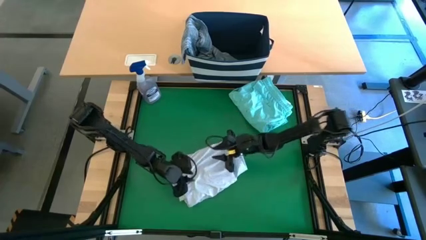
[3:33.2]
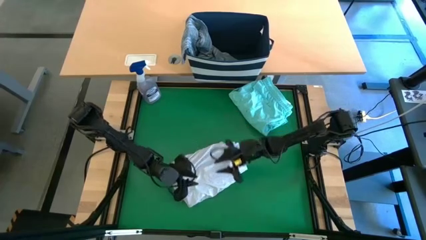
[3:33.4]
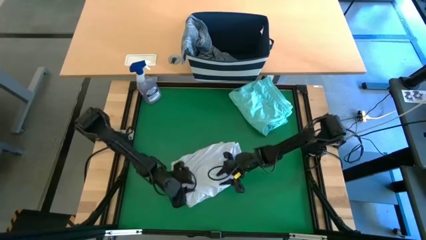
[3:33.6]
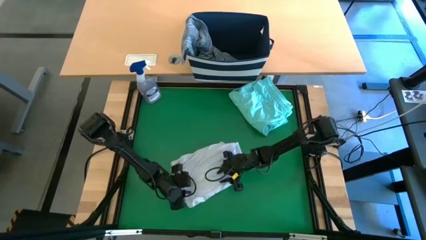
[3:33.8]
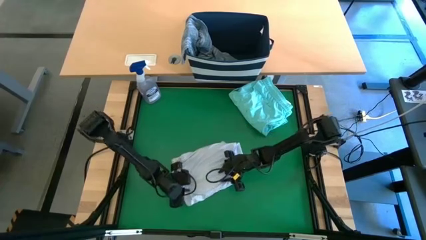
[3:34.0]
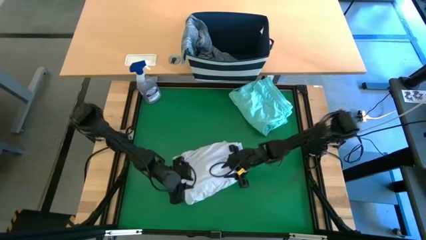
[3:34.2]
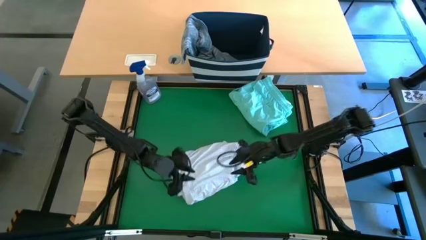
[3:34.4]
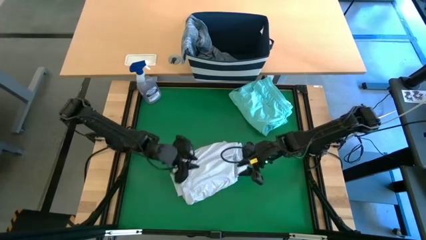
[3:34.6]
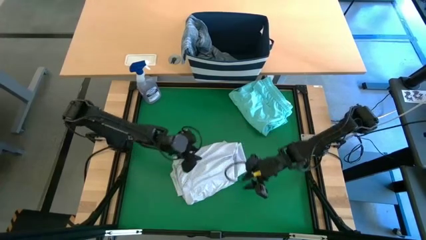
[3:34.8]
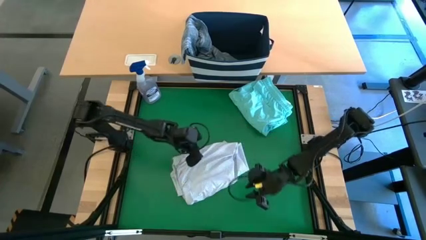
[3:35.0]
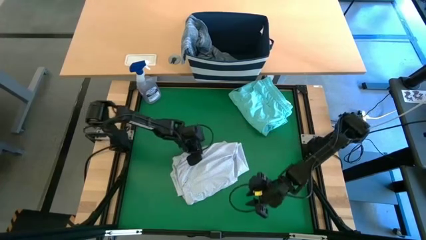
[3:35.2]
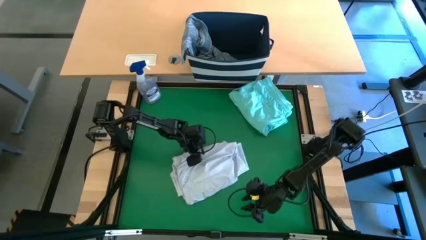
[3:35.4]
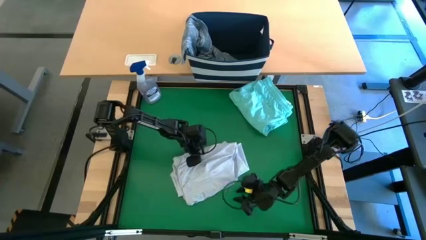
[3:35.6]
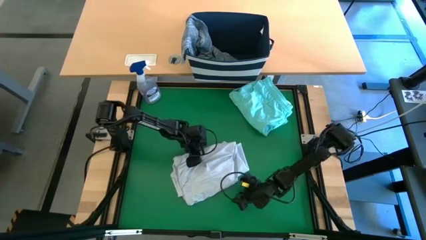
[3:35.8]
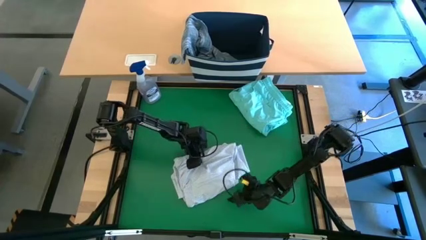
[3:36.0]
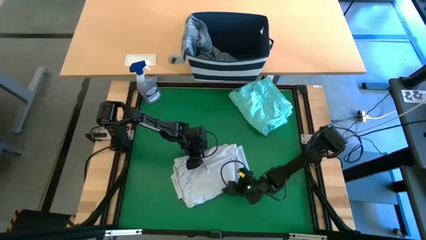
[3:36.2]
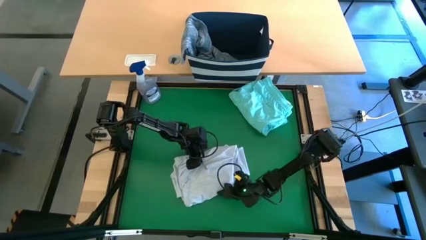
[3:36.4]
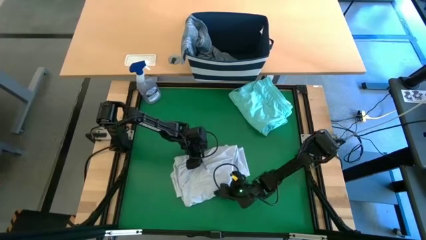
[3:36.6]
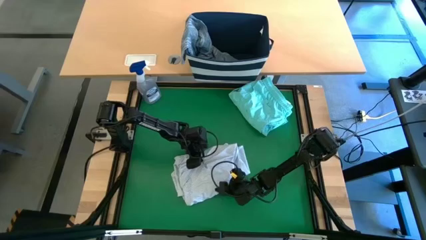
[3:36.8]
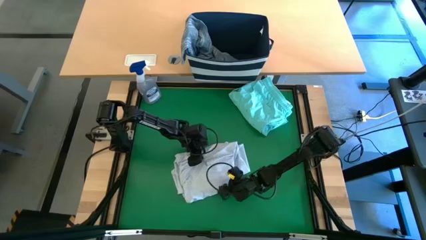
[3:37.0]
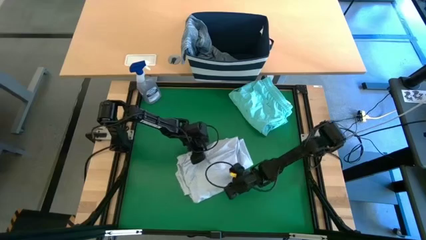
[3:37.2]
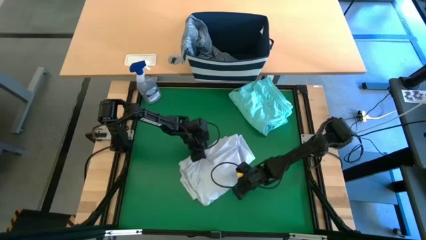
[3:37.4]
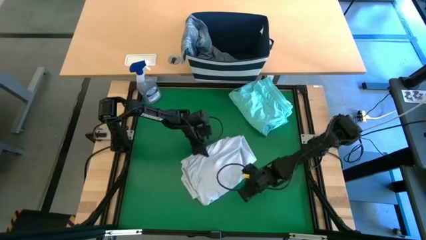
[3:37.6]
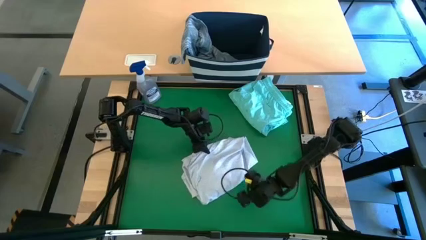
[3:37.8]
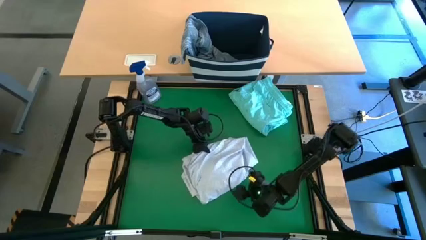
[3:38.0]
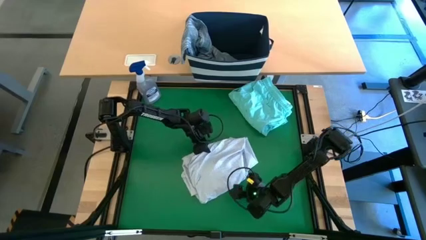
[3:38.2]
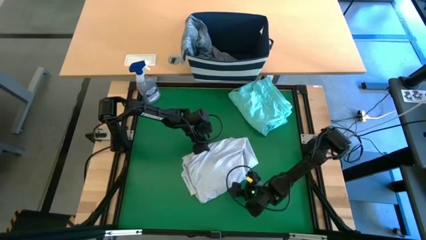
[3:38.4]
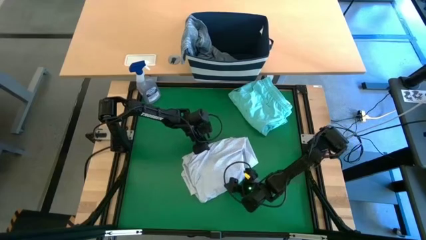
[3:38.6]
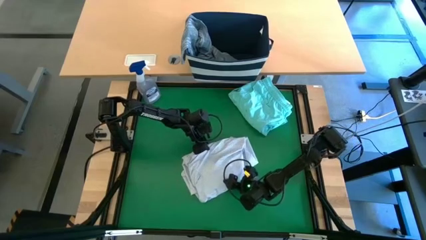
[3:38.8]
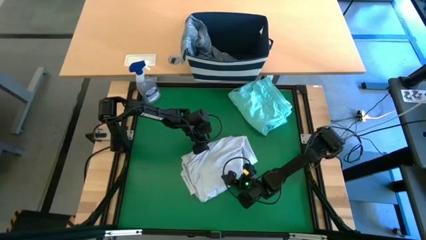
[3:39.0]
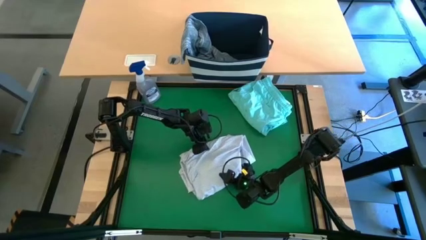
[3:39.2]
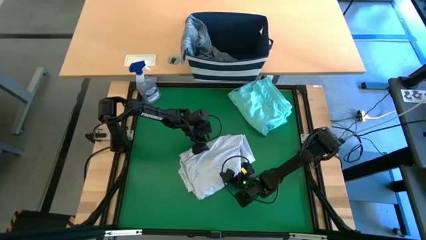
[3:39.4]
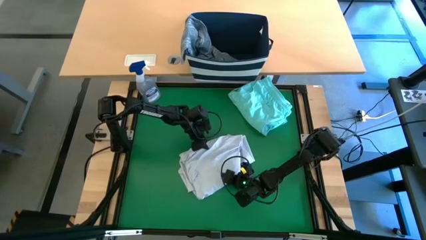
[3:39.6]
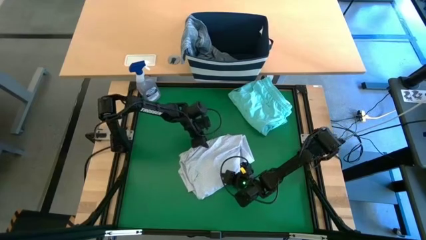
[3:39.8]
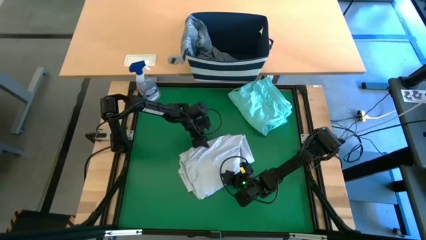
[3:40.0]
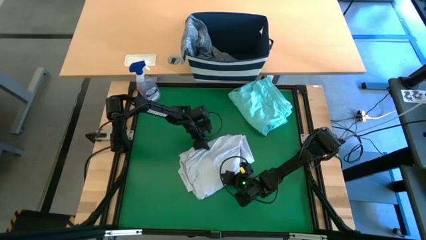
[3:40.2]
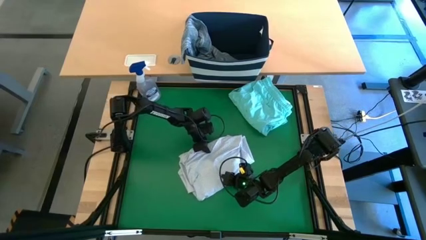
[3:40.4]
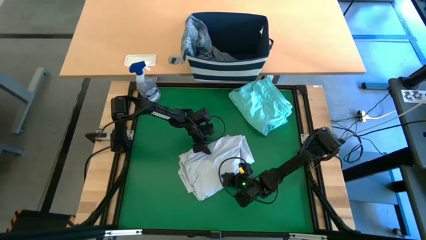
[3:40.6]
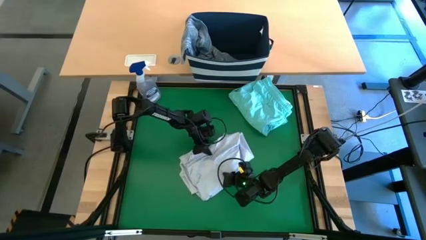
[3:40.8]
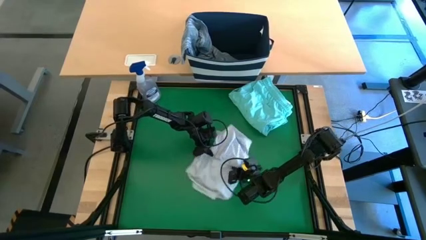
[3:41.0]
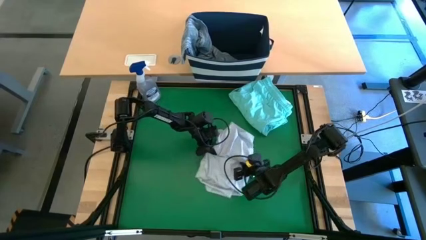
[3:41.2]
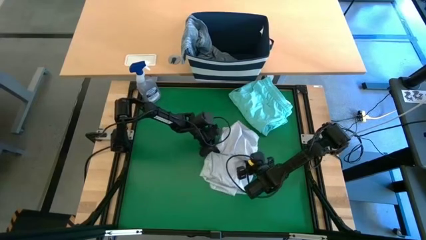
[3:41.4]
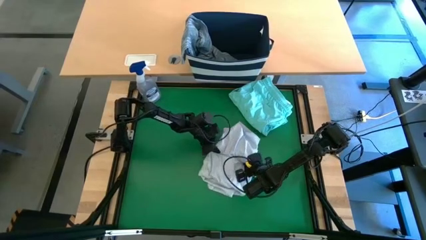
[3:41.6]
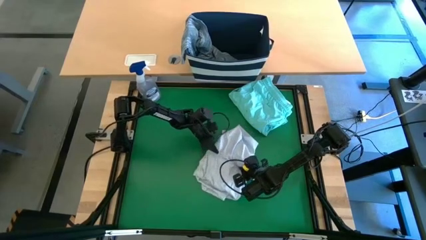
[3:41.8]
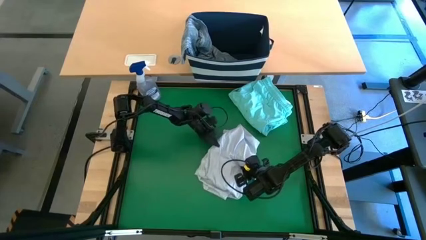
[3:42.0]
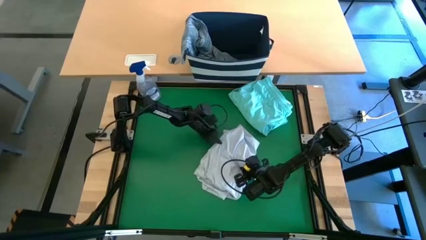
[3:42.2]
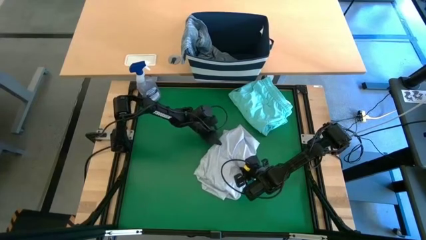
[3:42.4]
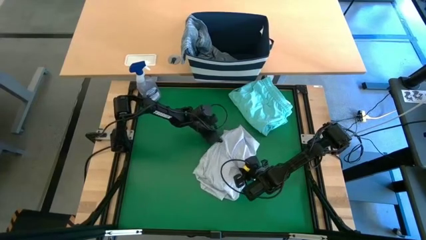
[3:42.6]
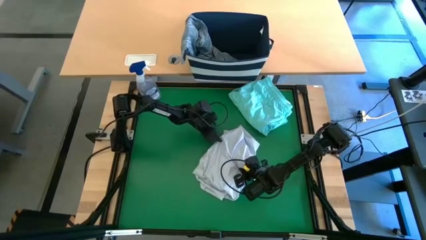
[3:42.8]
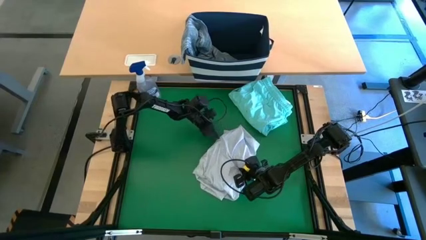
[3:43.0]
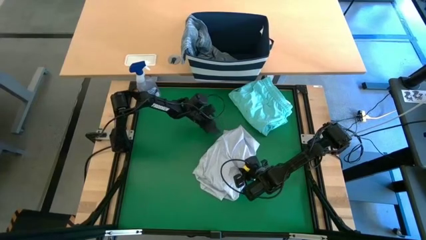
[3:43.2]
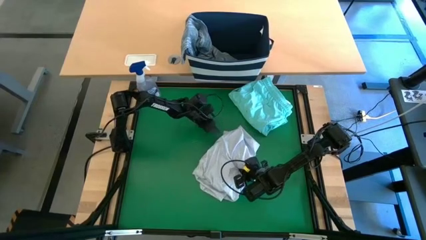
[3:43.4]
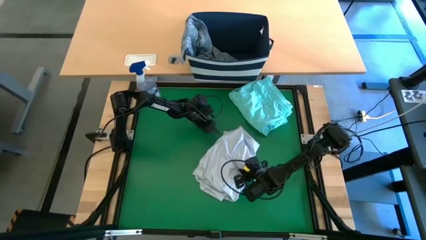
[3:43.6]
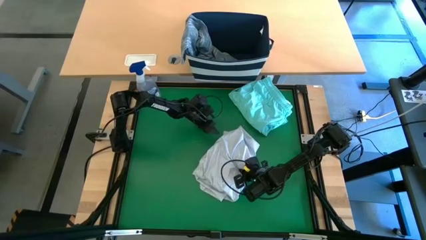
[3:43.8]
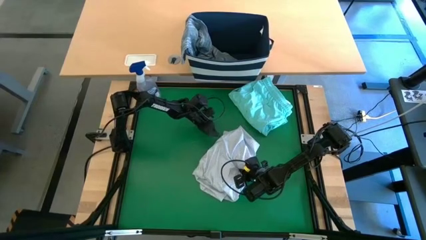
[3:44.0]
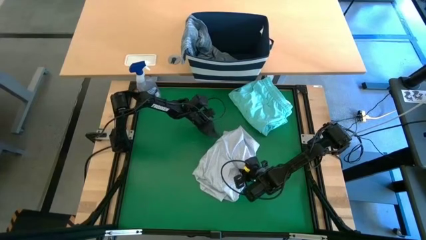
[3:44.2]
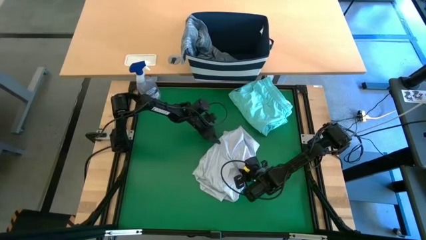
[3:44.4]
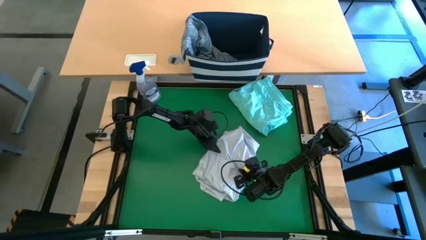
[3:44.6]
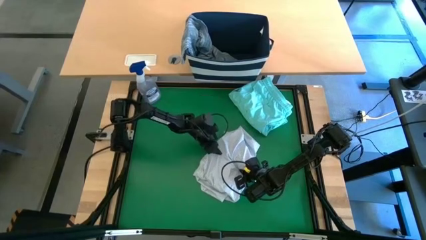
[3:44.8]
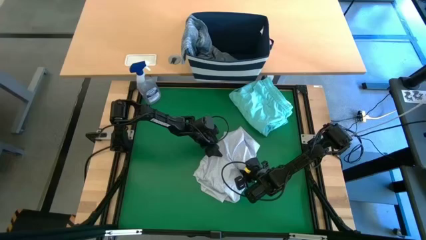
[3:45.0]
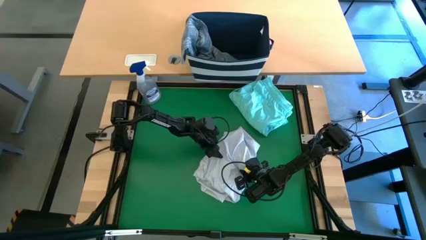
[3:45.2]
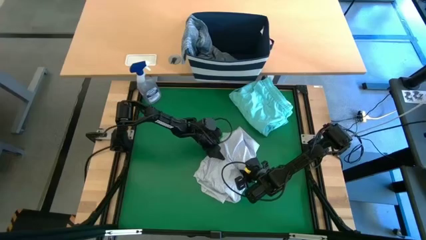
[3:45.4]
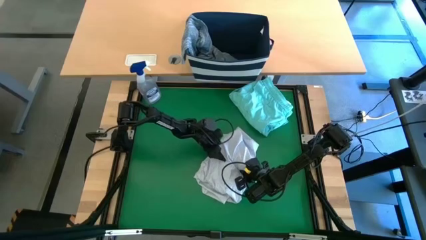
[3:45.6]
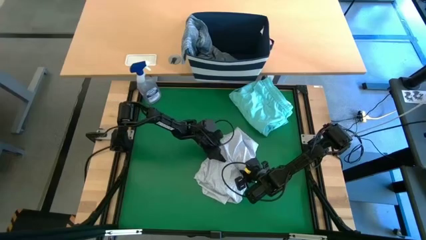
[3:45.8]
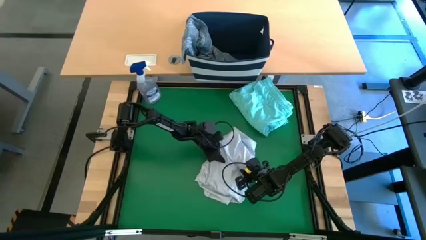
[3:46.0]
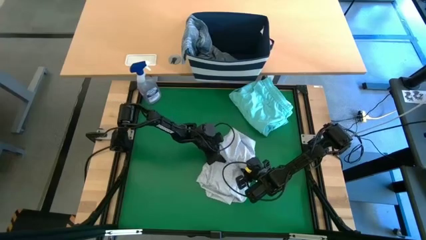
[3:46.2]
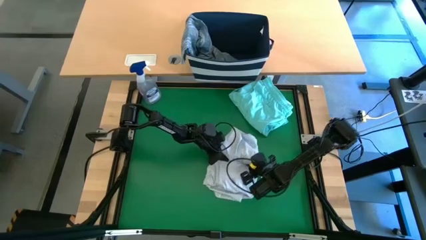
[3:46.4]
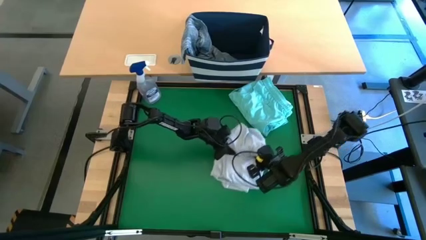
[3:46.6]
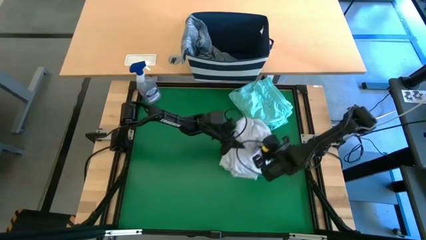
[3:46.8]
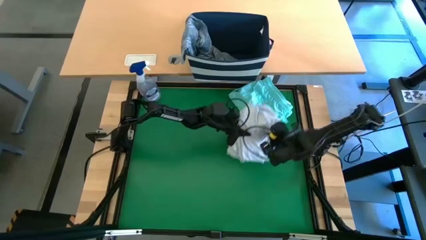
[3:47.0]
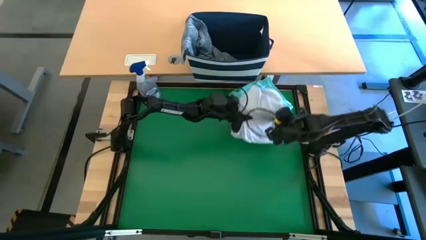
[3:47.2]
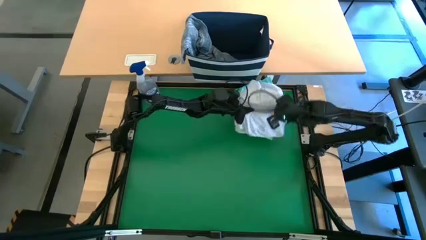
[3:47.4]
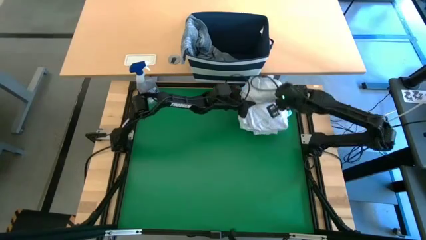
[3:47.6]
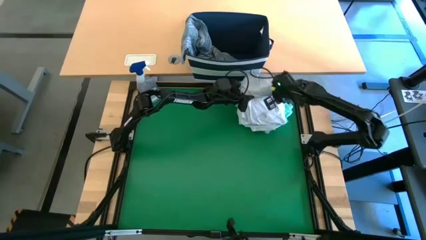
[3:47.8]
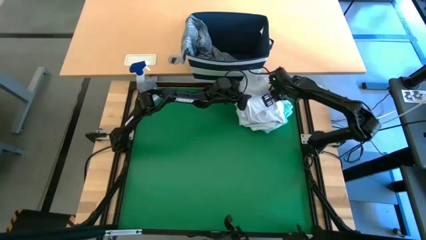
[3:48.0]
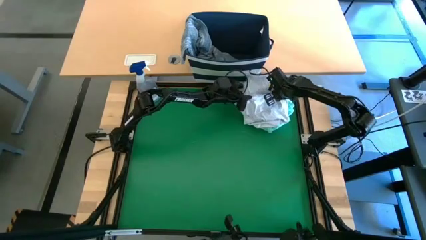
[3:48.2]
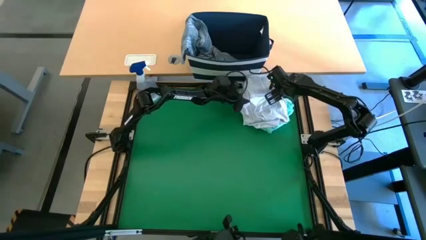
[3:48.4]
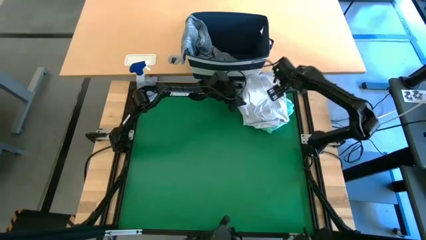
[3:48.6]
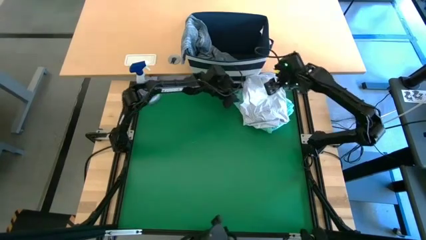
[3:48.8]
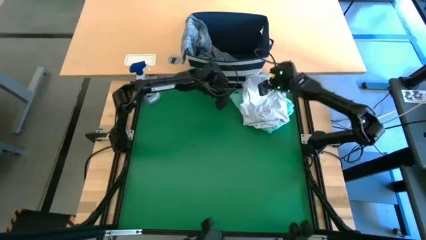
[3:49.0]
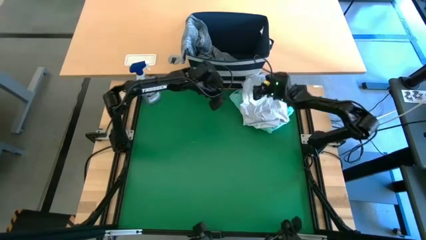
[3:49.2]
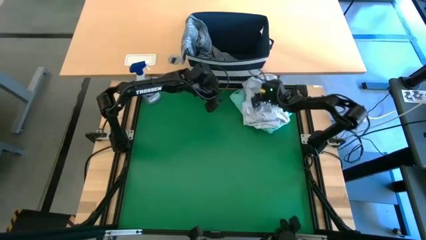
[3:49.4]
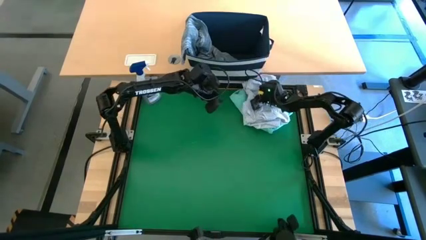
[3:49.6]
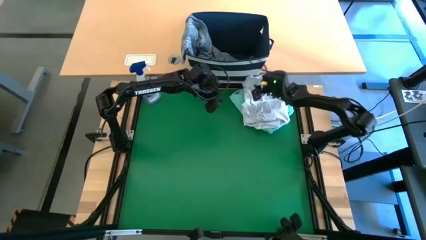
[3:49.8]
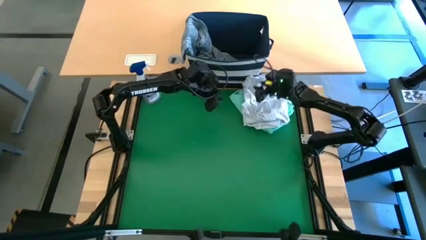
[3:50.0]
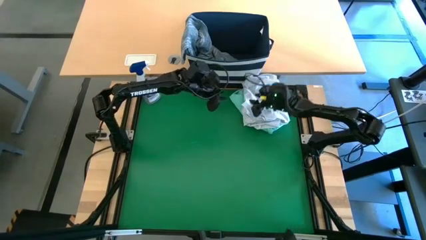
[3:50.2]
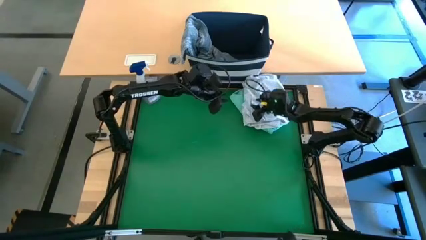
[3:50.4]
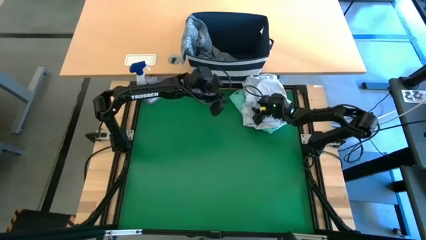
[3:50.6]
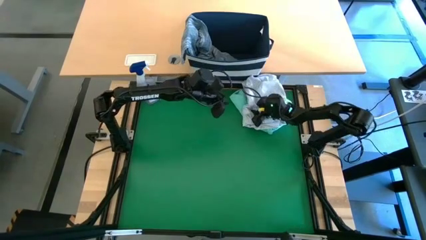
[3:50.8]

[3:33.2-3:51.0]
Task: Fold laundry
Stack the white polo shirt on top of the blue short
